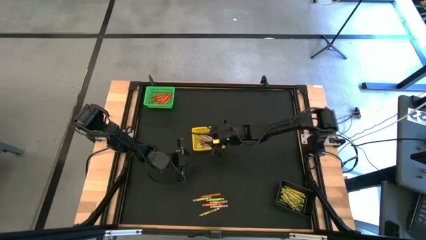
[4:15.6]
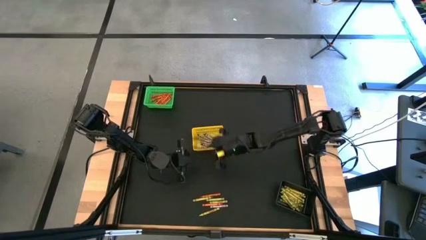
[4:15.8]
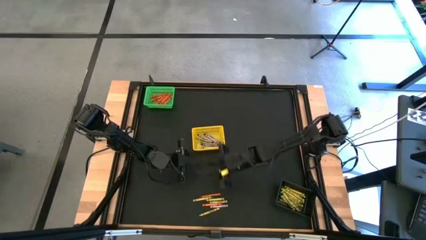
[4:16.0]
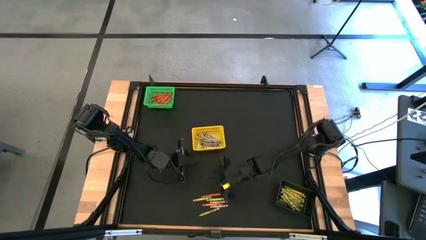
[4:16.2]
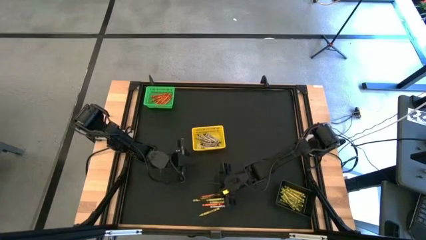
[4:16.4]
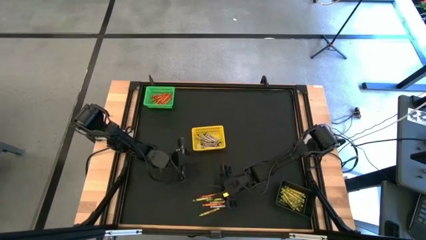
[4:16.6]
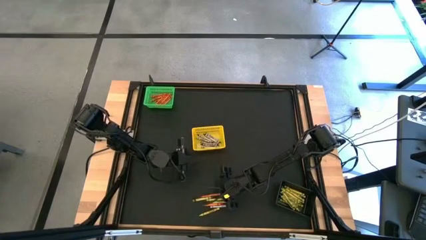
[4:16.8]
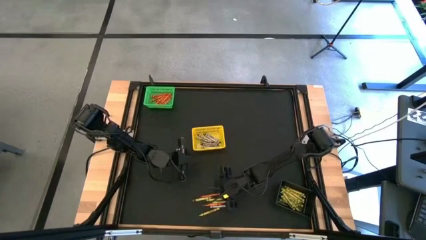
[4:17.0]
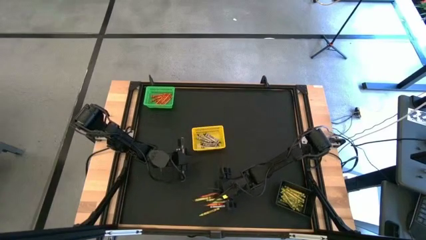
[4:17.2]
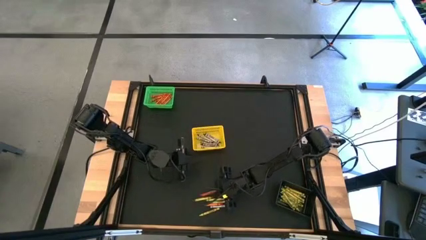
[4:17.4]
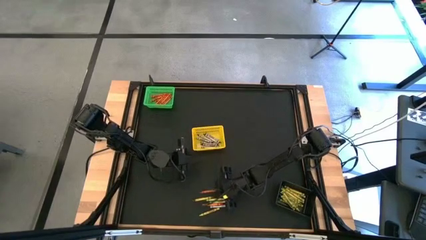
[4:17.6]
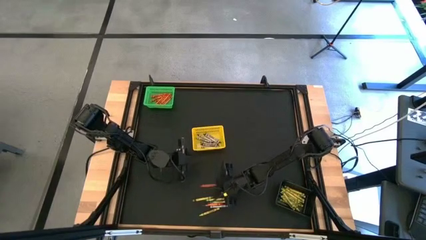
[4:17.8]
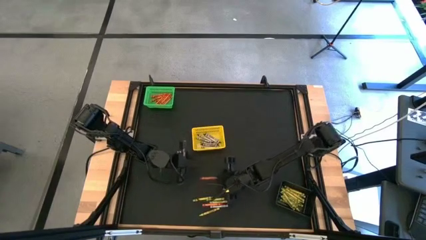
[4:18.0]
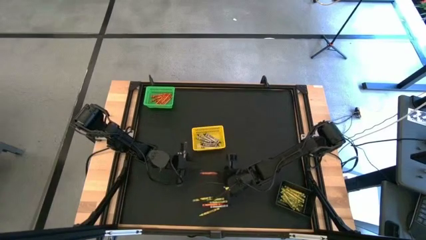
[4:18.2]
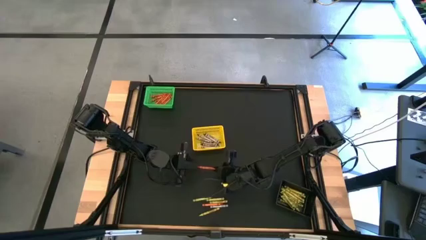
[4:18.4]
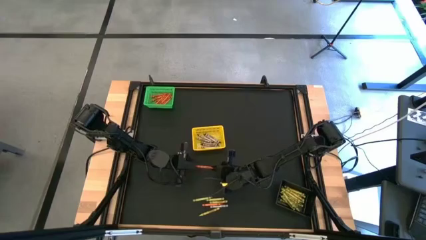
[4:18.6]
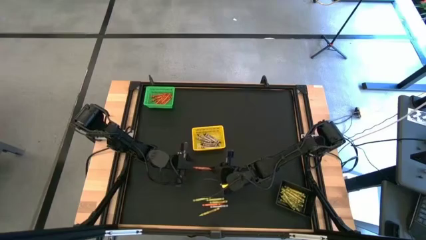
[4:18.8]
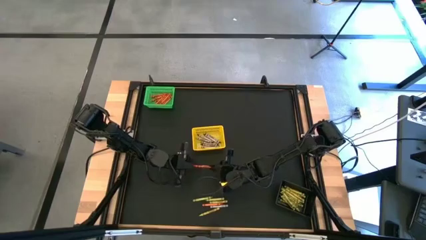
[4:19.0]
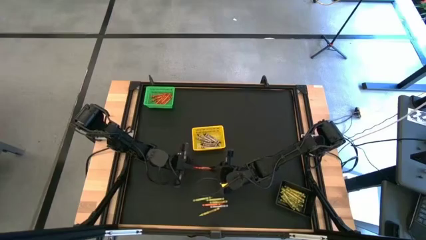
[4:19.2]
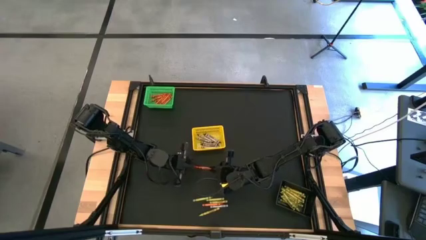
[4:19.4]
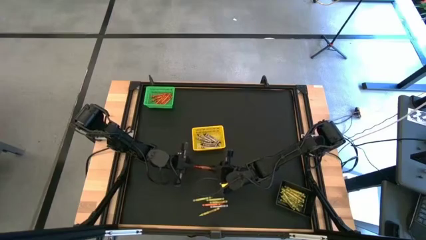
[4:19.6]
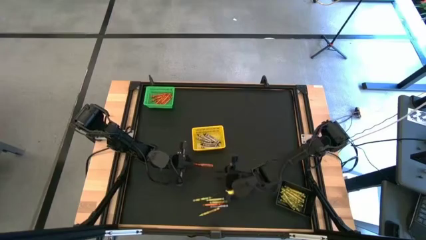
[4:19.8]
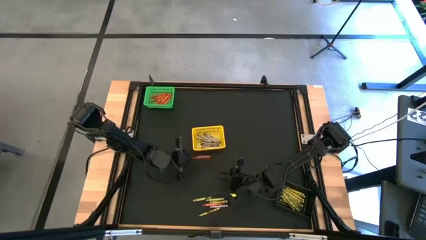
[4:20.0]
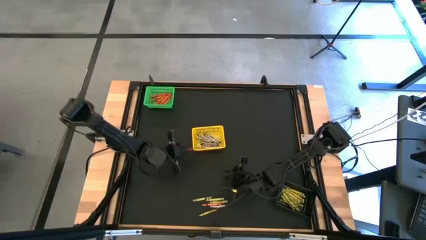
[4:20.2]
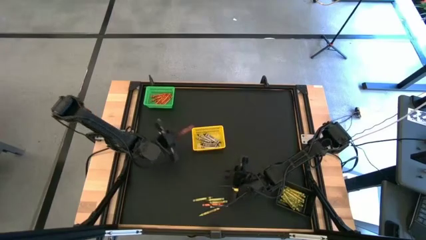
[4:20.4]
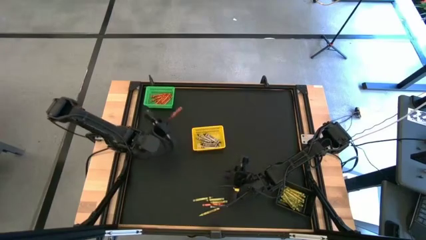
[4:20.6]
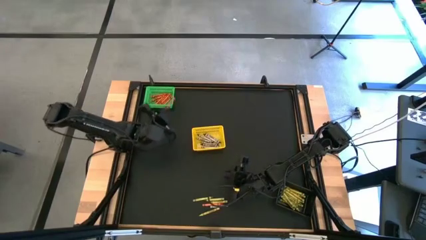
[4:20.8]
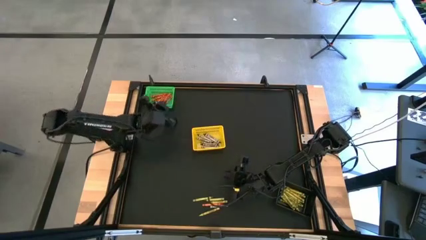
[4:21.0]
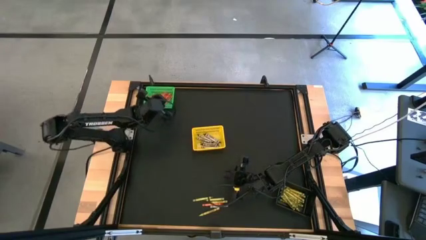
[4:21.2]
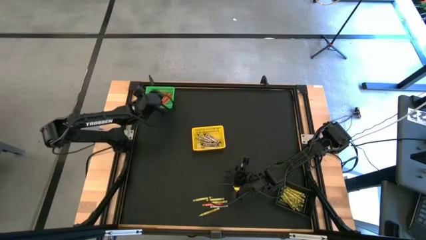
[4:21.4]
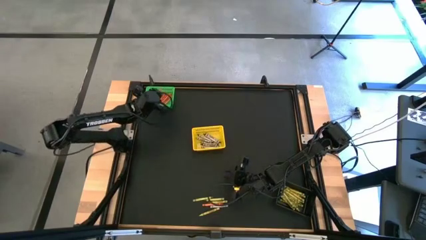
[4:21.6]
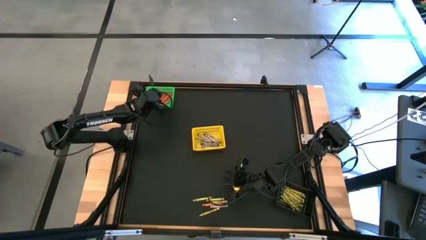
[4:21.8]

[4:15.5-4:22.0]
Task: Sort crayons
Put the orange crayon into the green bin

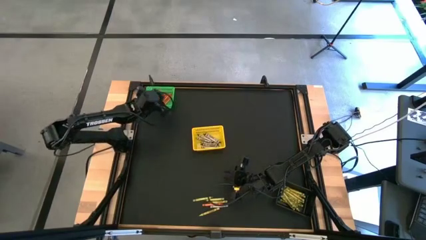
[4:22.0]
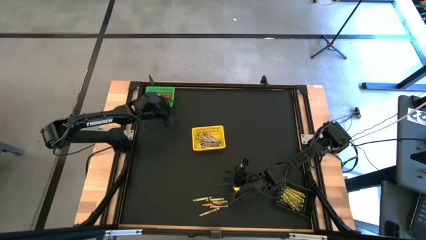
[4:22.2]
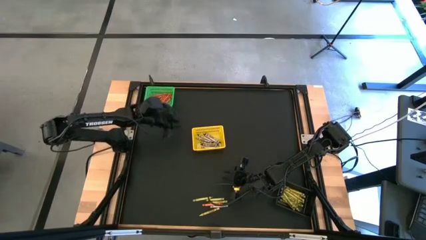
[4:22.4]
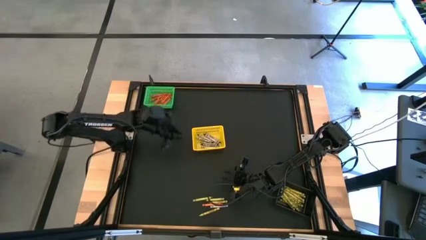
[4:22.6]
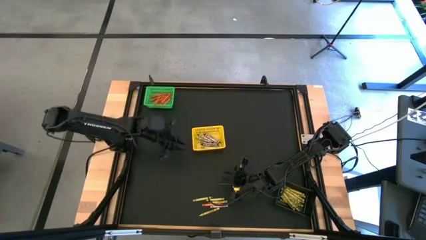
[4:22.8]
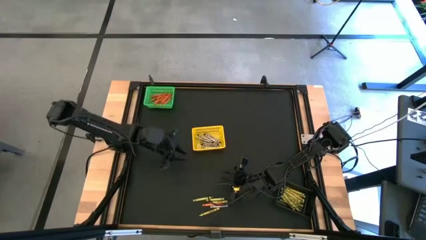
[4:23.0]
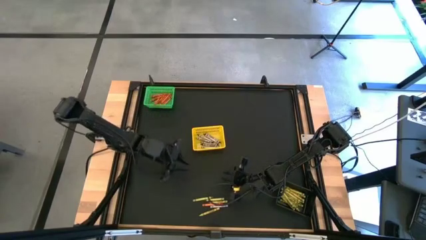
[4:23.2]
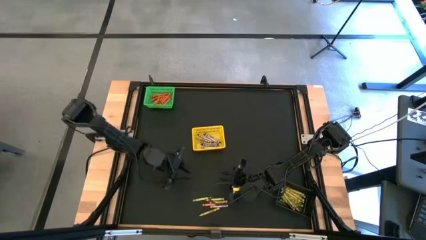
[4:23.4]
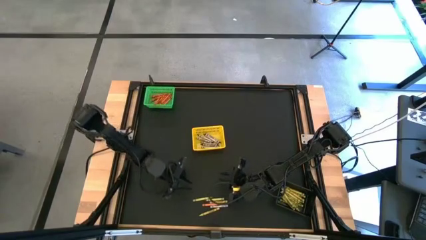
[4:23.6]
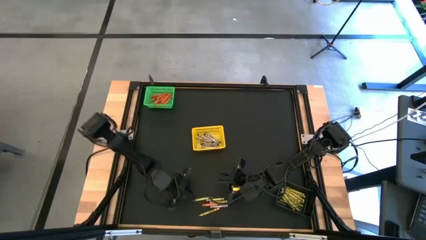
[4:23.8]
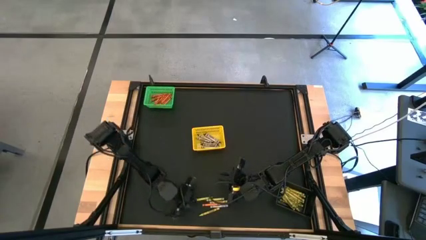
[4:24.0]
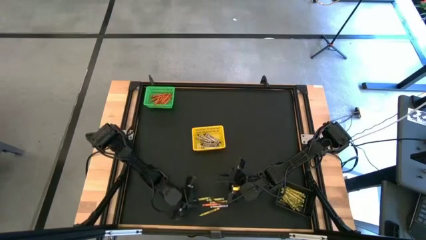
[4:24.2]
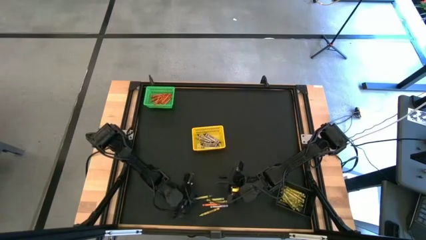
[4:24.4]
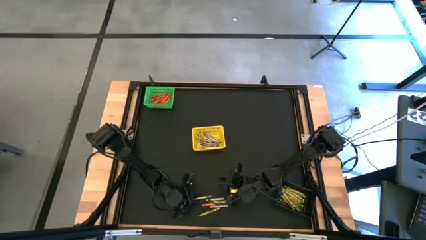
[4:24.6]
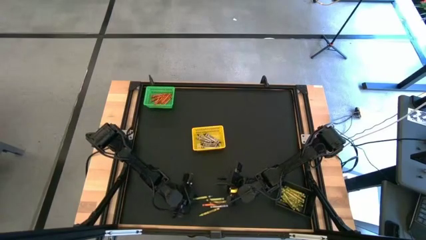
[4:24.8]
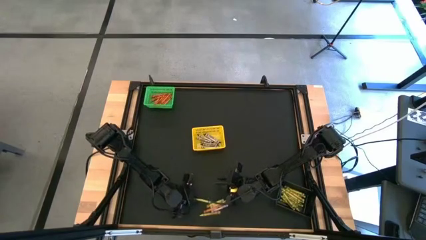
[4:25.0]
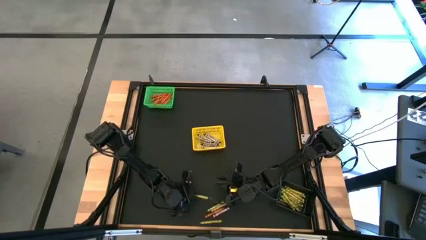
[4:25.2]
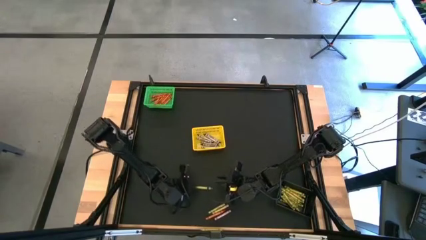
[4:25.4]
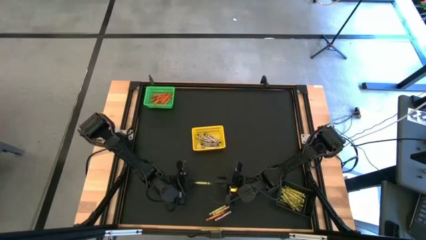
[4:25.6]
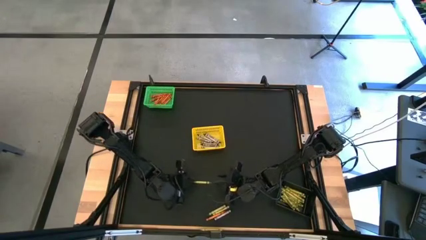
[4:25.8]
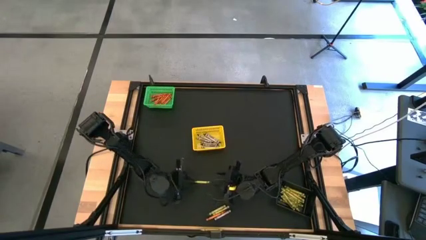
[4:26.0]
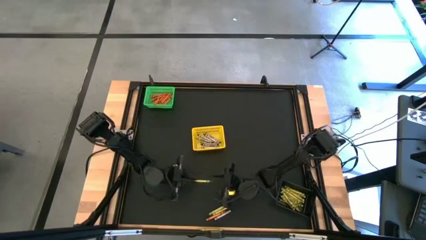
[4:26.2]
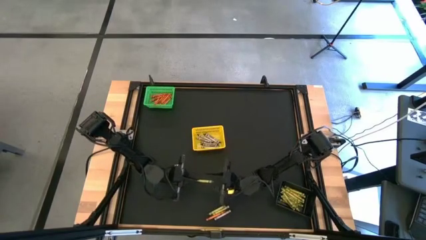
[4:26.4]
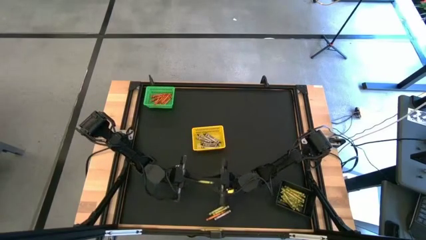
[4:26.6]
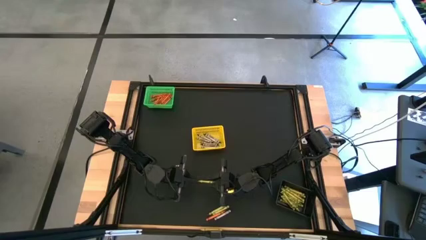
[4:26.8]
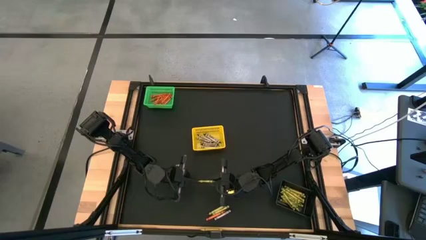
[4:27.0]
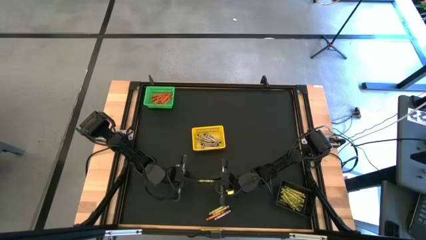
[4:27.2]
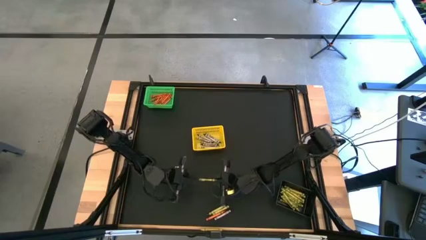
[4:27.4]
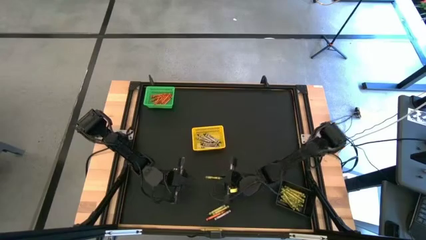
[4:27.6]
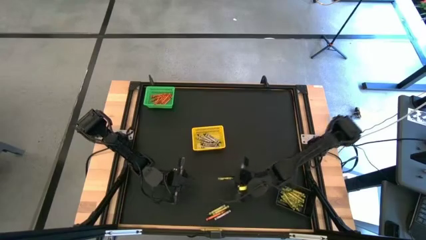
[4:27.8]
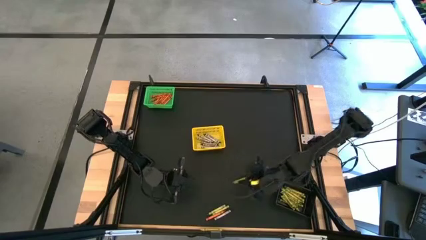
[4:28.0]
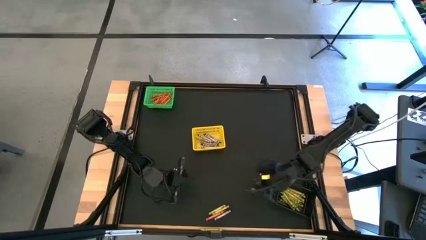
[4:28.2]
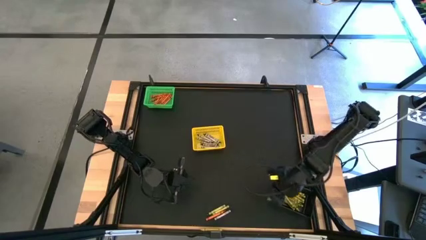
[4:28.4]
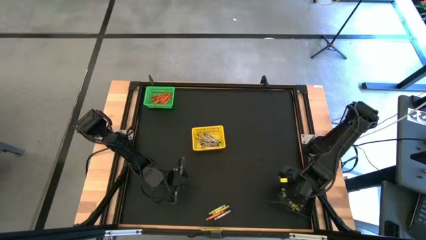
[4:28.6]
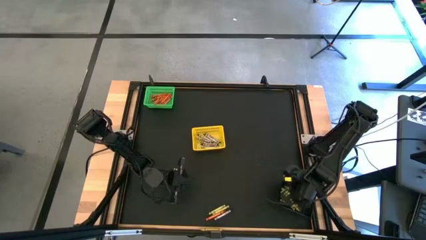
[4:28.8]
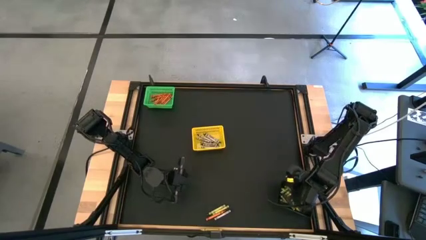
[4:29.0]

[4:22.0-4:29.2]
Put the green crayon into the black bin

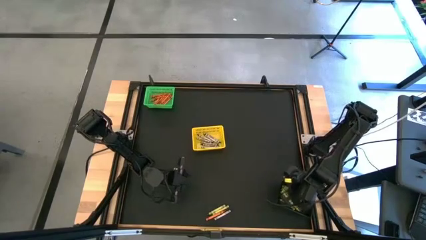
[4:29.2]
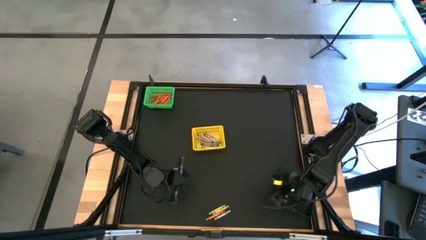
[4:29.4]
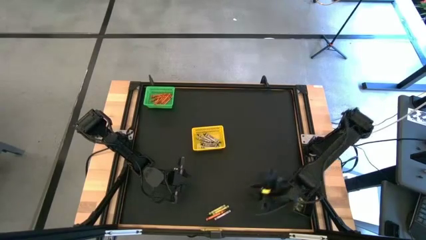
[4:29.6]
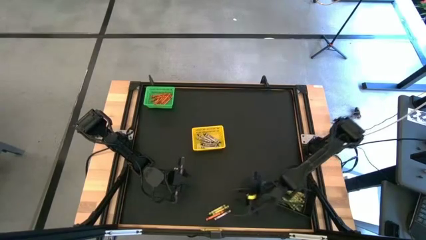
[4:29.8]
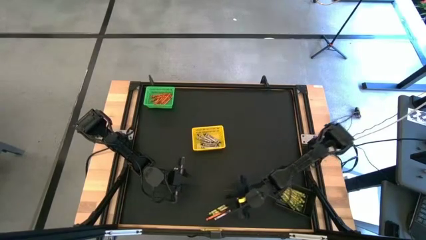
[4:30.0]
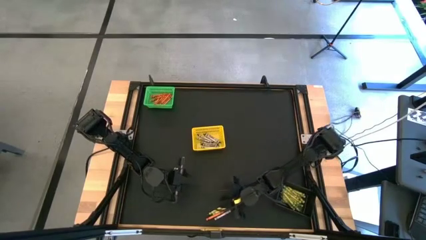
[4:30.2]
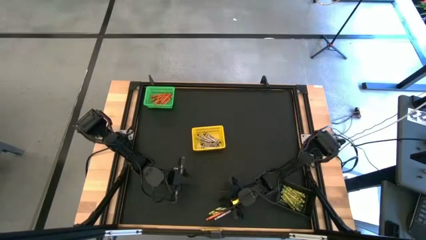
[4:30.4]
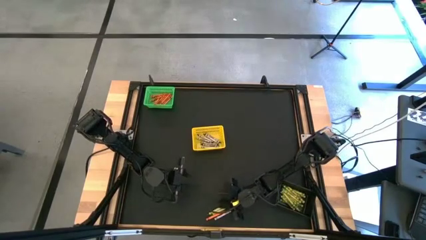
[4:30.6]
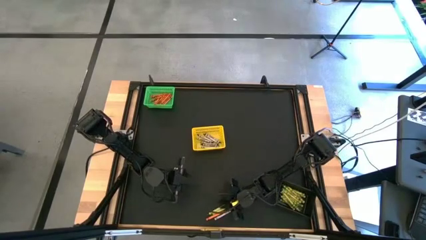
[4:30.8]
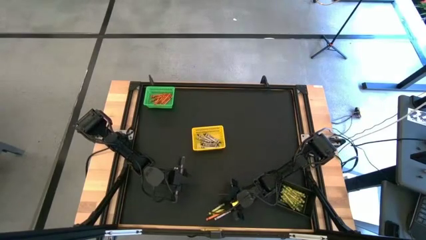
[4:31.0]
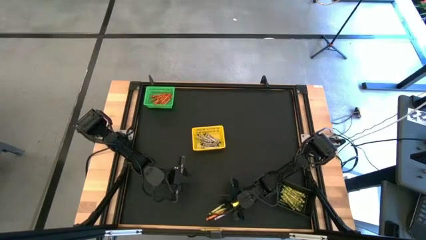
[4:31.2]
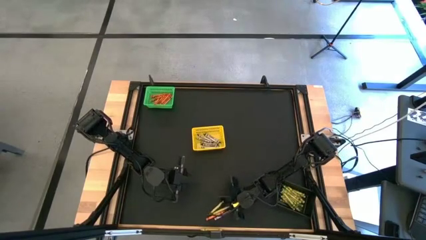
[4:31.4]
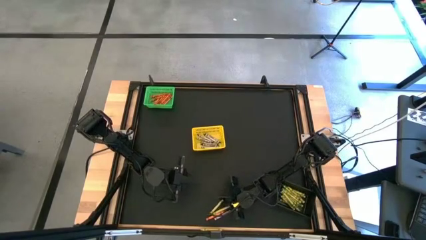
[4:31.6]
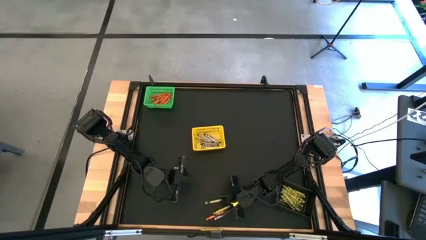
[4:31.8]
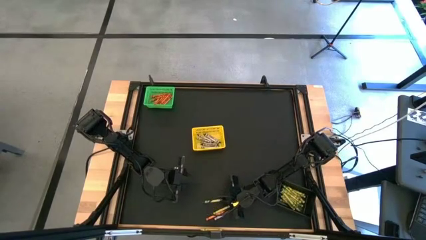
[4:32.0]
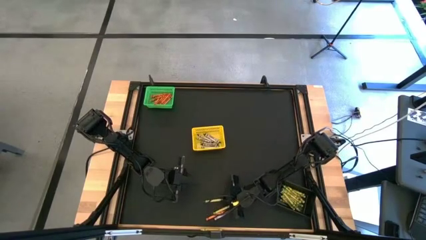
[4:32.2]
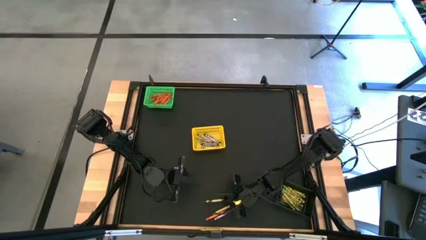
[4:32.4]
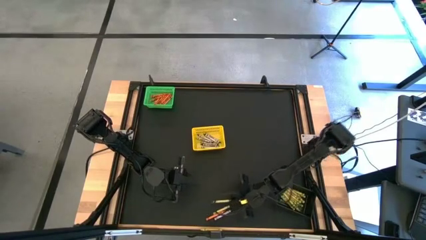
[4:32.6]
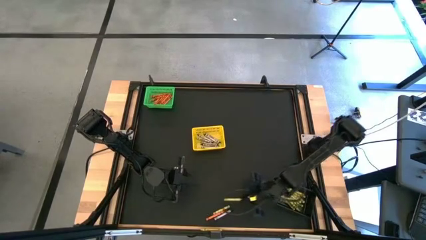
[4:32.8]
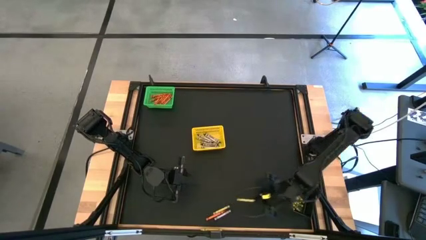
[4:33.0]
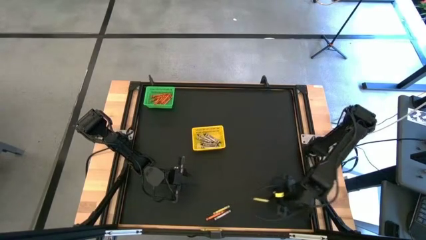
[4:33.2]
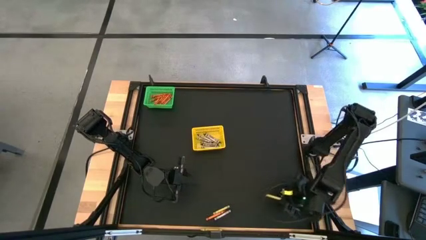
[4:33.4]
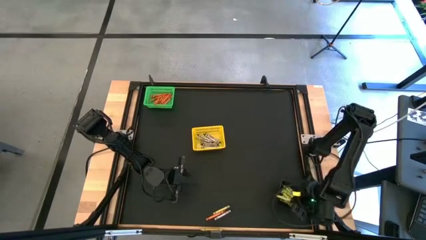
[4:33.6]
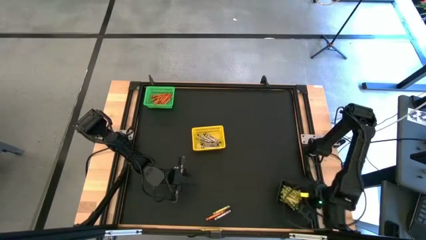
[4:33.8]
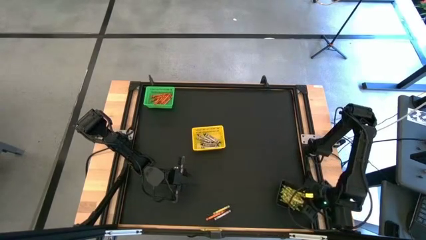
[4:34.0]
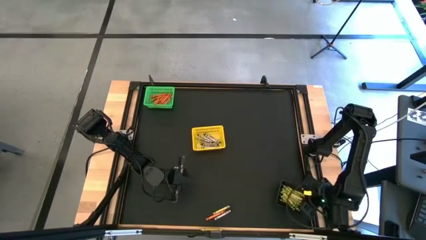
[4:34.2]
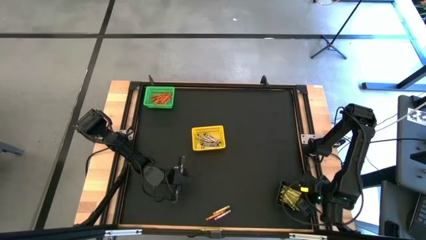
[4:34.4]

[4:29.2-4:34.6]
Put the green crayon into the black bin
